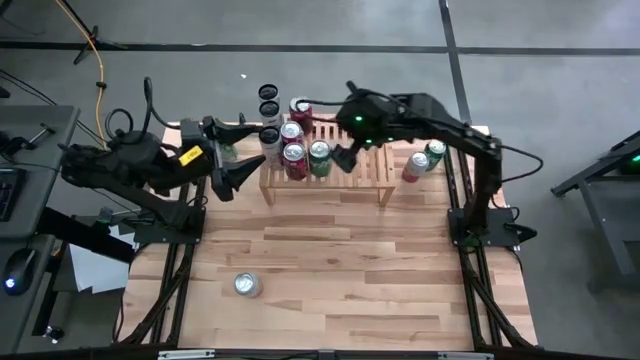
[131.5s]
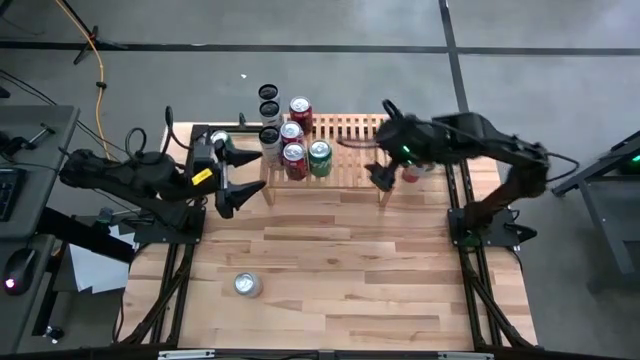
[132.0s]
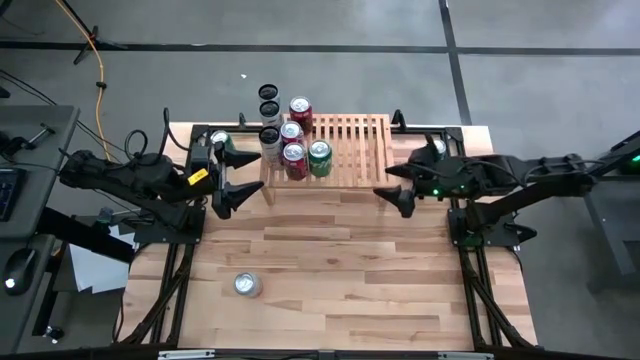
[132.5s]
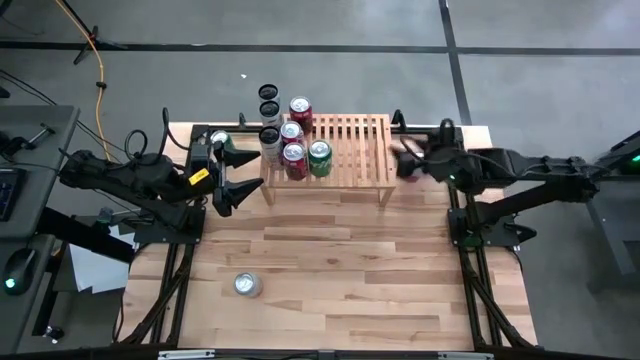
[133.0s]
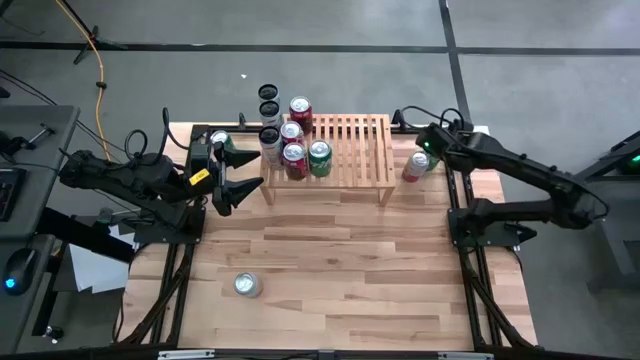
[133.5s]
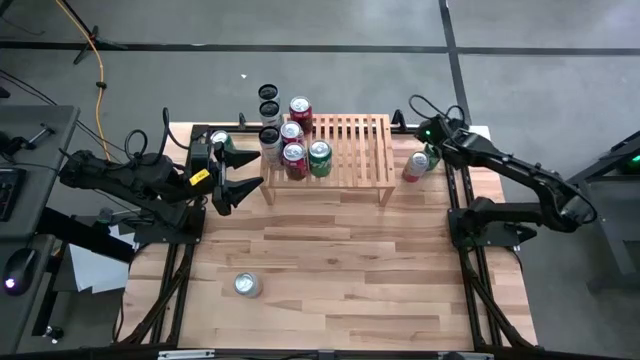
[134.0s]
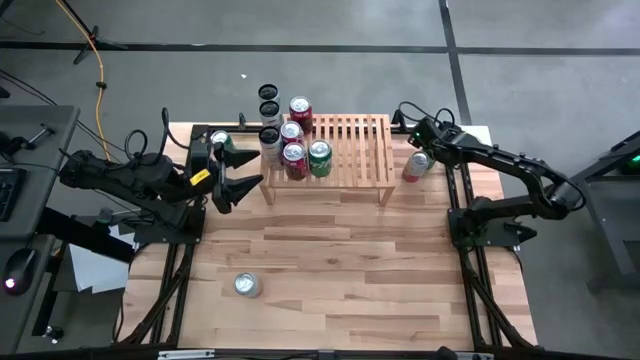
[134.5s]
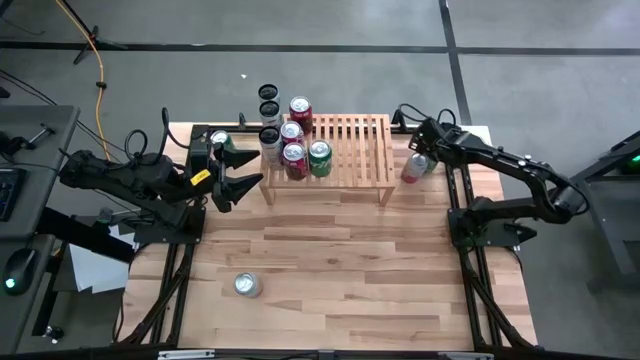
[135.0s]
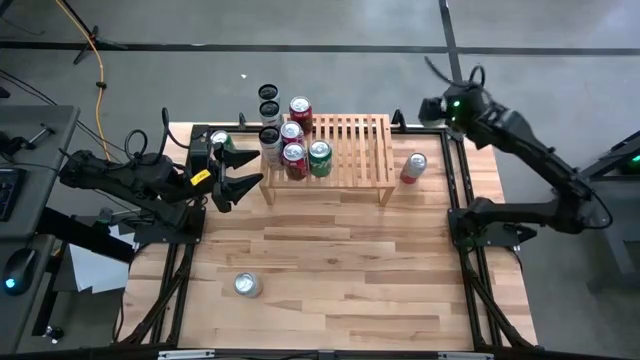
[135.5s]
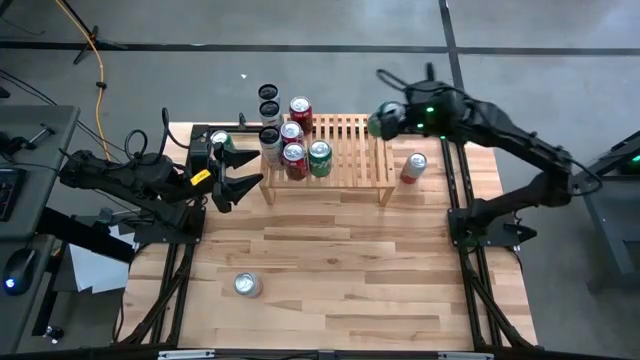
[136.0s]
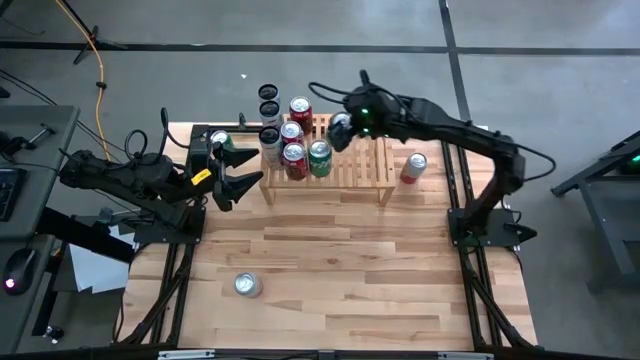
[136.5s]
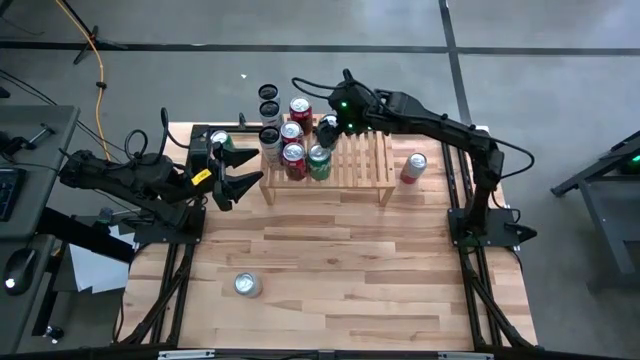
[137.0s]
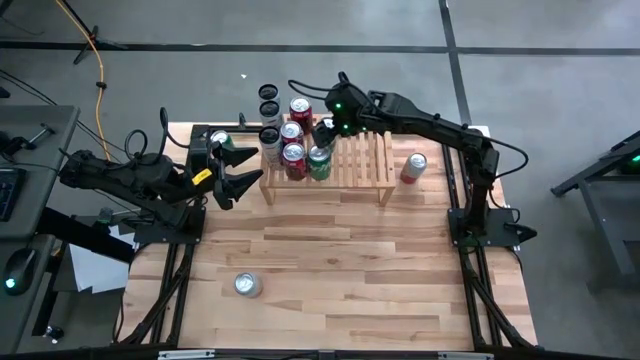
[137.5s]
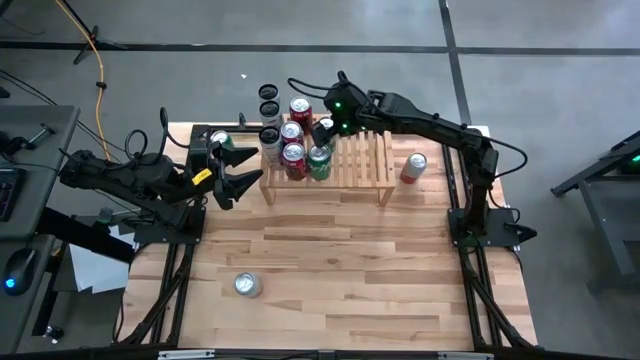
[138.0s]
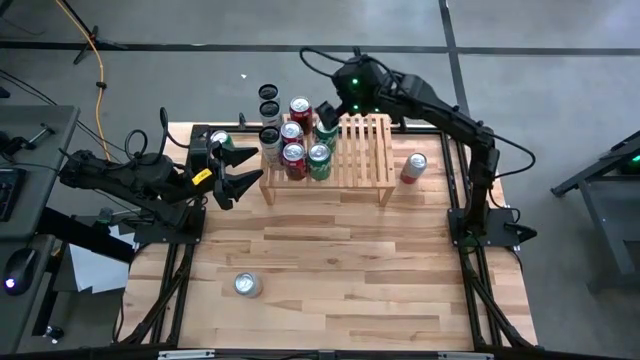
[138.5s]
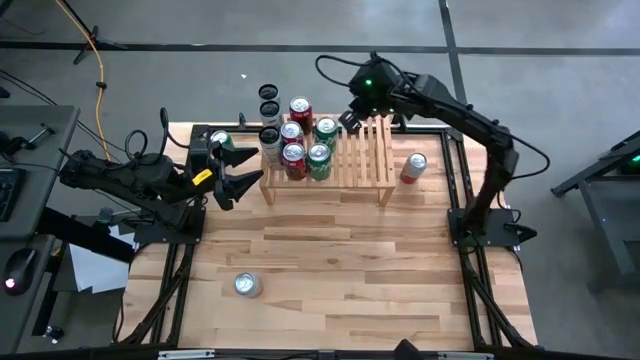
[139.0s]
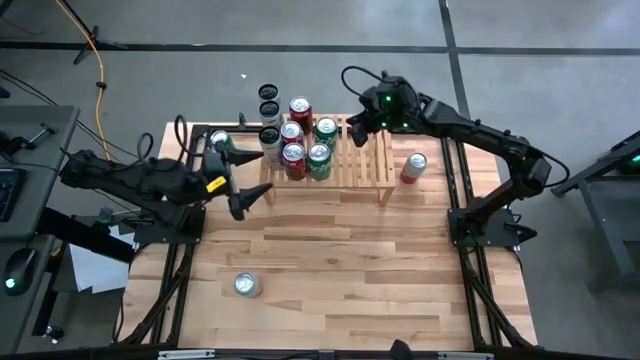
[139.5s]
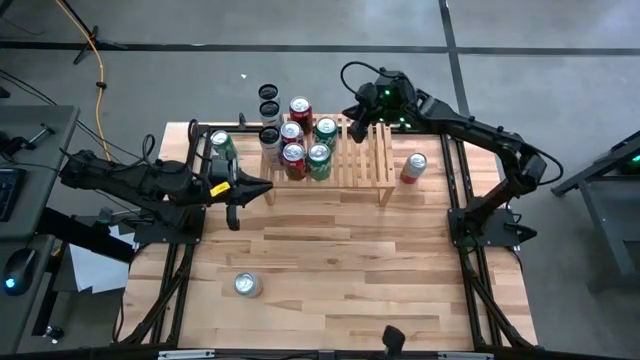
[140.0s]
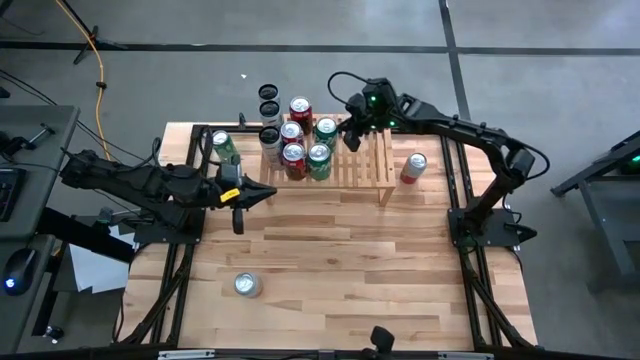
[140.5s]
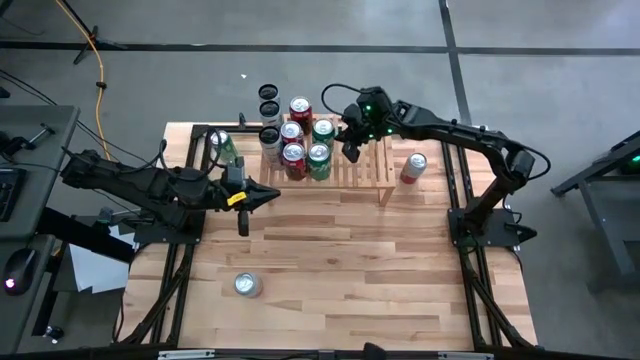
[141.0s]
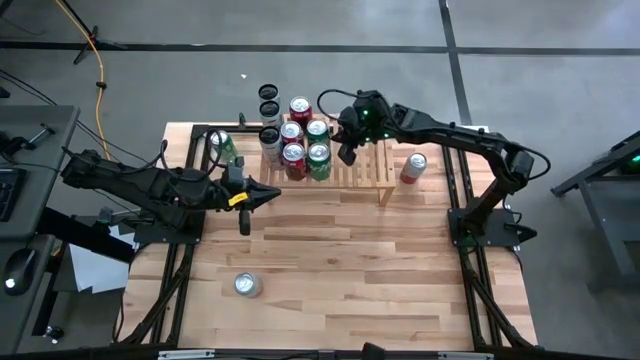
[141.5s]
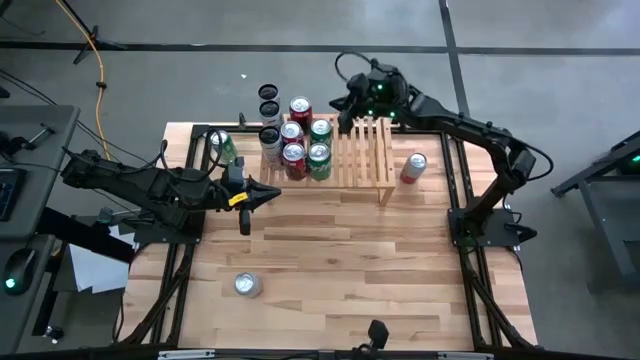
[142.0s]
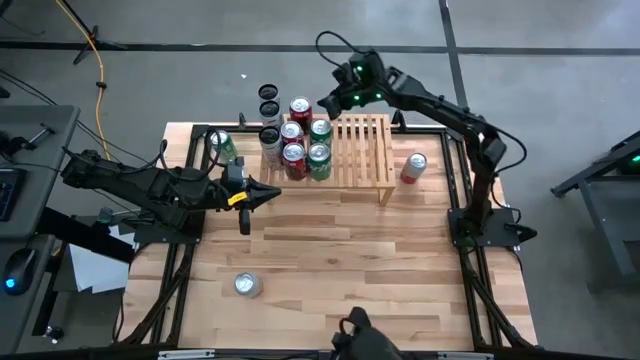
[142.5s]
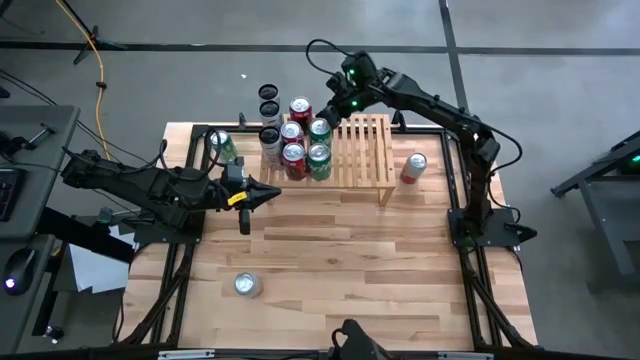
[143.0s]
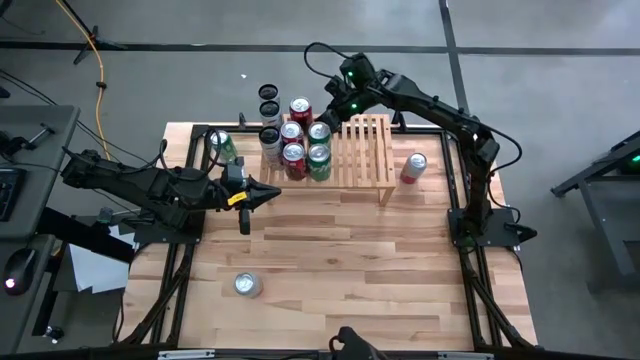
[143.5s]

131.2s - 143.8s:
Task: Place canned beverage on shelf
Put the right green soda can on the shelf aligned with the other green soda can

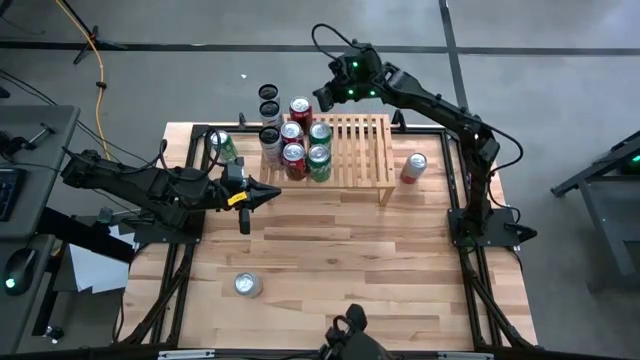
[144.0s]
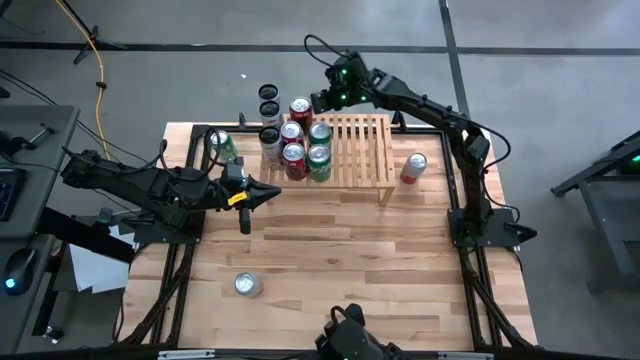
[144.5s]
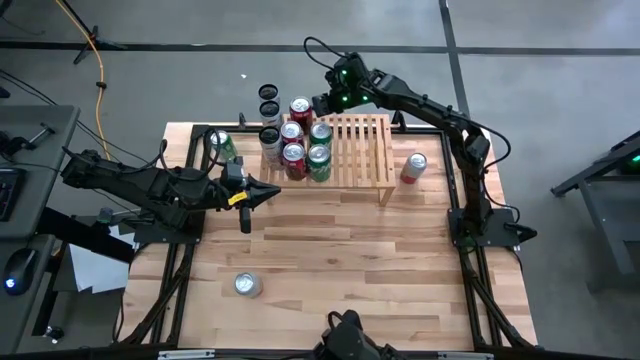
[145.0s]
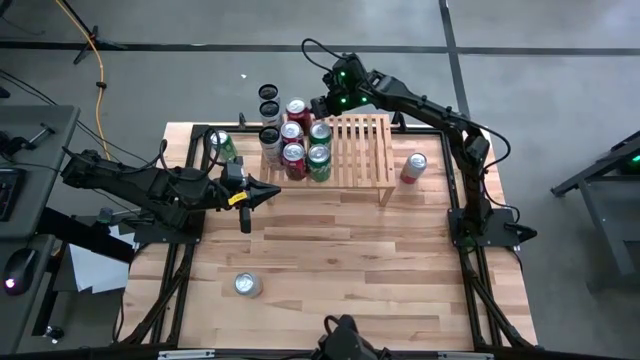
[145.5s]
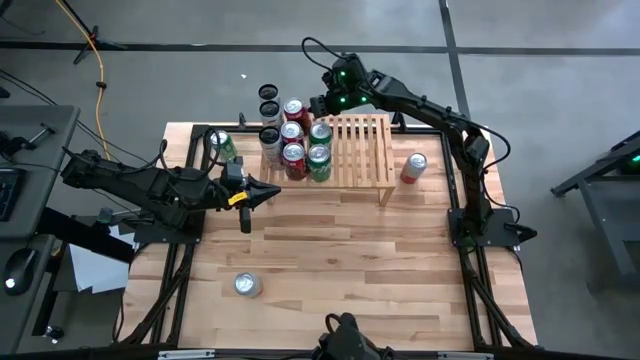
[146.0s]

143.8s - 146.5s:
Adjust the red-white soda can on the shelf

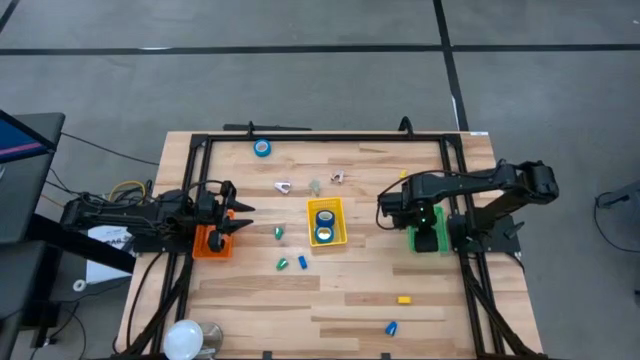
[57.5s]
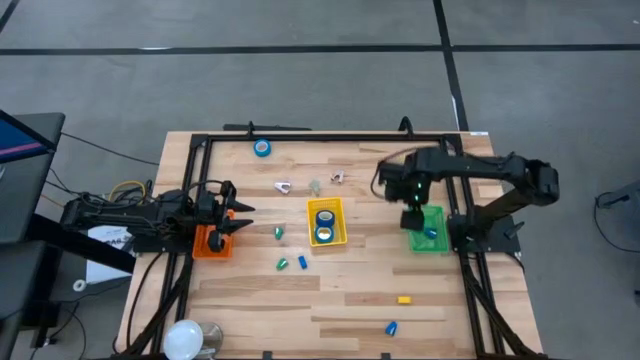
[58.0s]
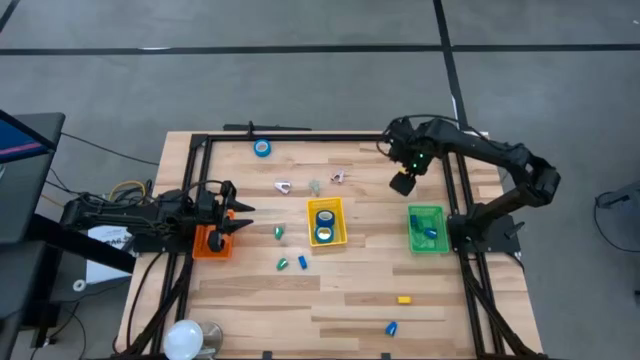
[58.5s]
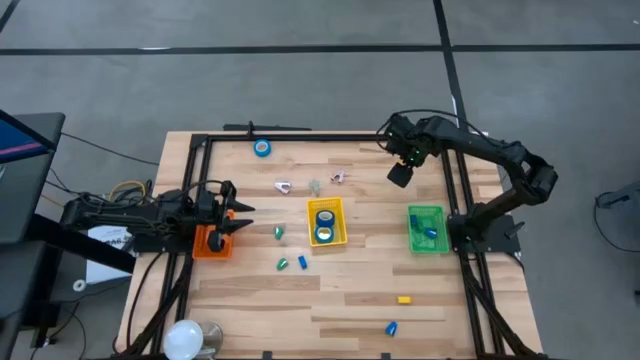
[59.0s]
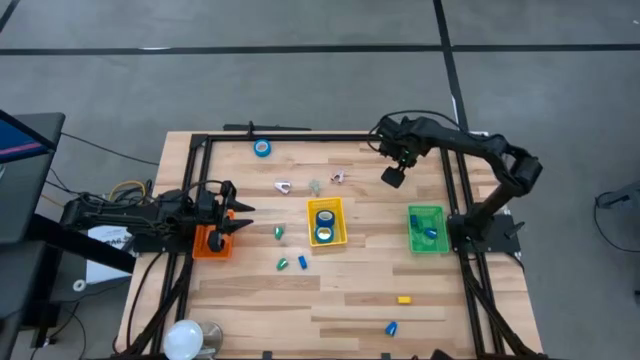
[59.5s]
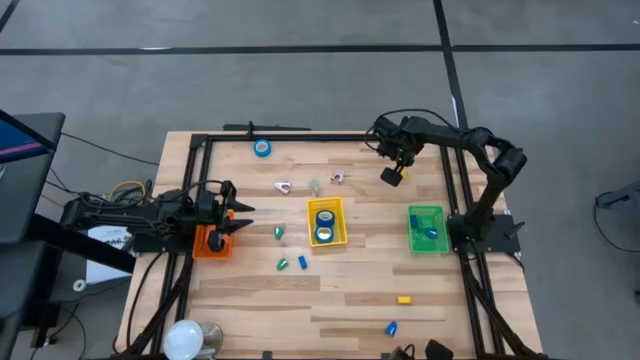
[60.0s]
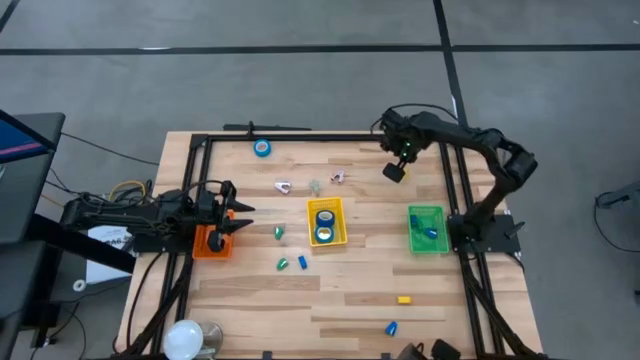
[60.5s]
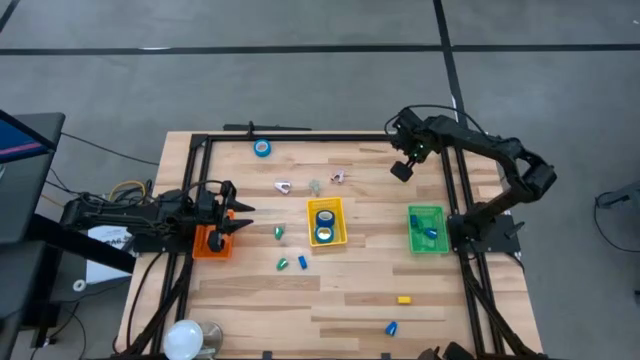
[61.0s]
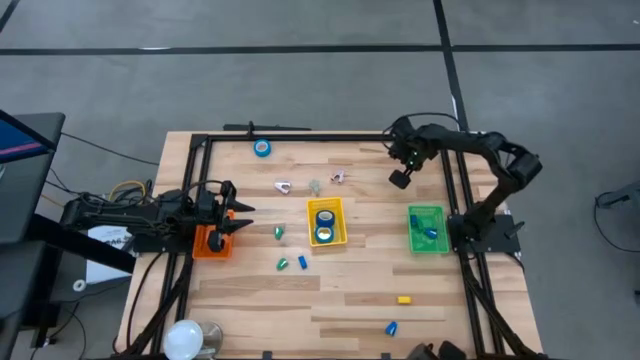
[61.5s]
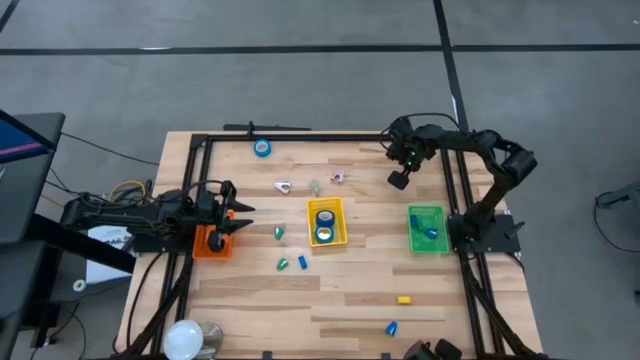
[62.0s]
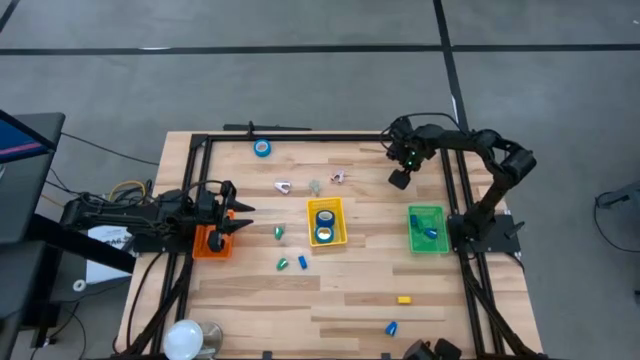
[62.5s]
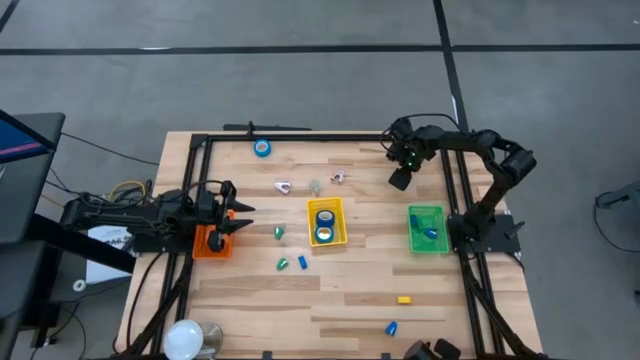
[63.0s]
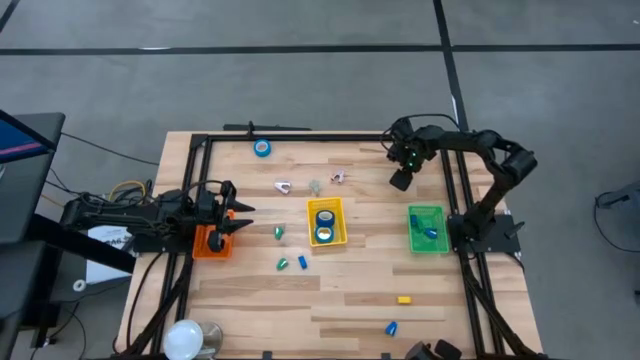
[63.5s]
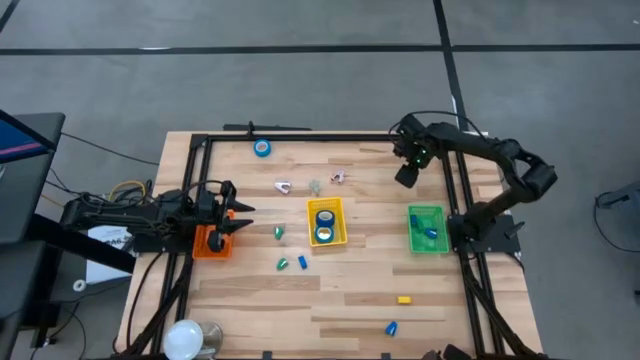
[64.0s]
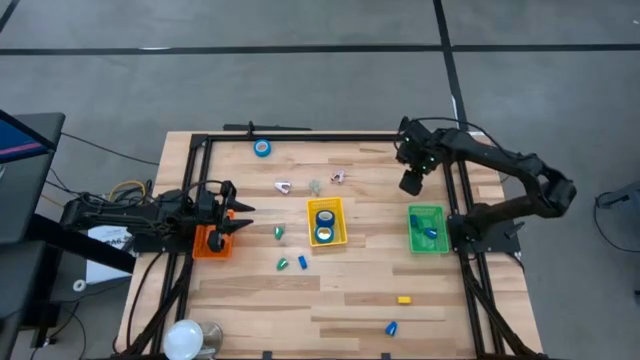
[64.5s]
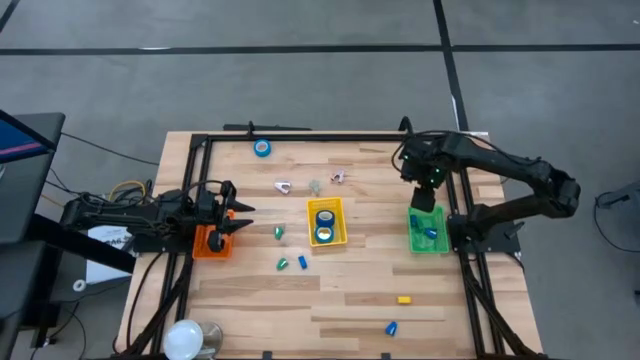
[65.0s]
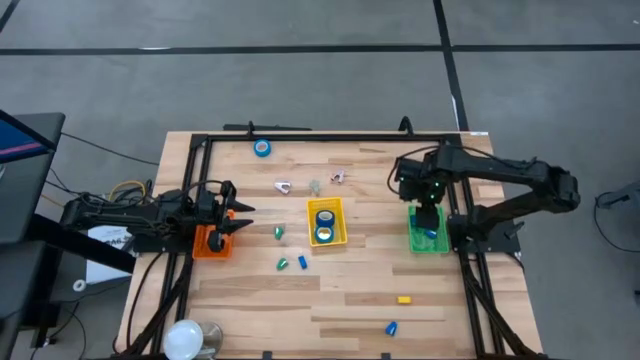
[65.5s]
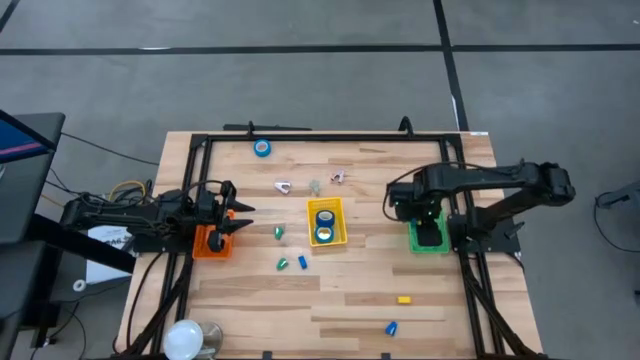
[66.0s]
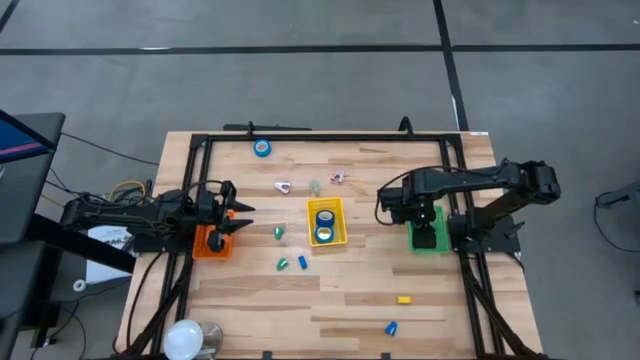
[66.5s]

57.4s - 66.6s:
Task: Pick and place Stapler, Stapler remover, tape
Put the yellow stapler into the green basket
